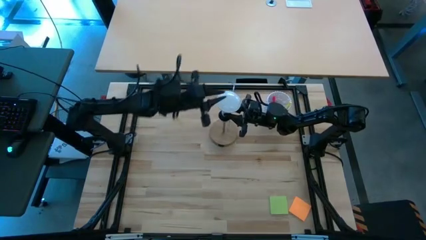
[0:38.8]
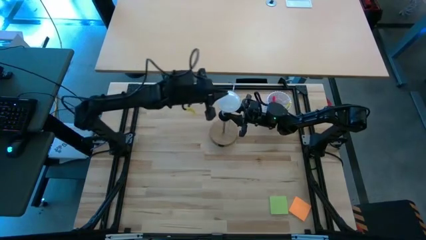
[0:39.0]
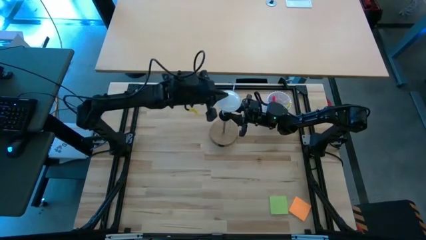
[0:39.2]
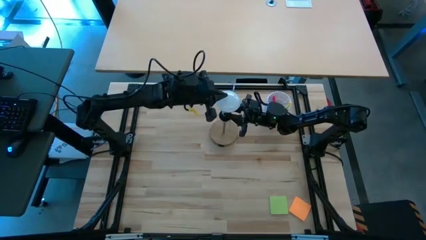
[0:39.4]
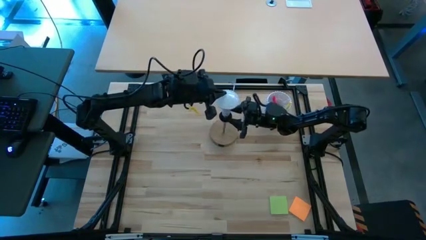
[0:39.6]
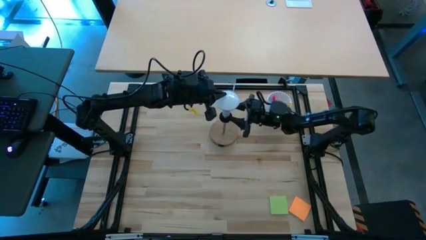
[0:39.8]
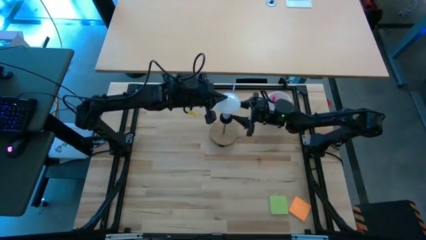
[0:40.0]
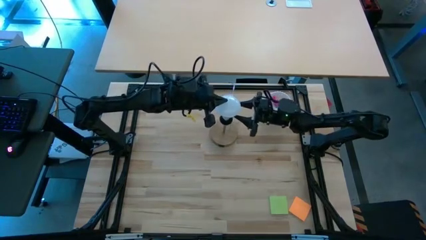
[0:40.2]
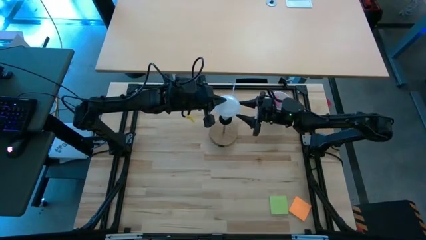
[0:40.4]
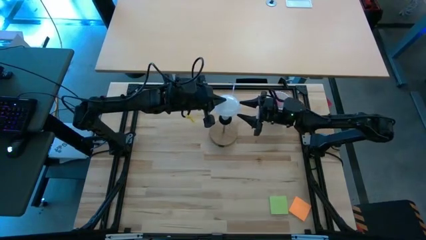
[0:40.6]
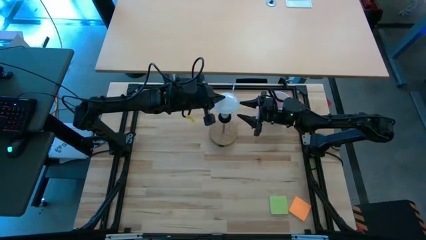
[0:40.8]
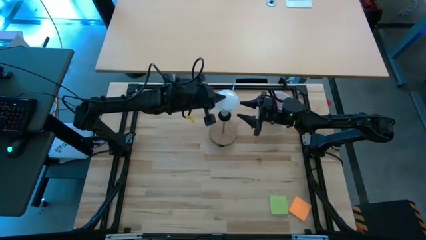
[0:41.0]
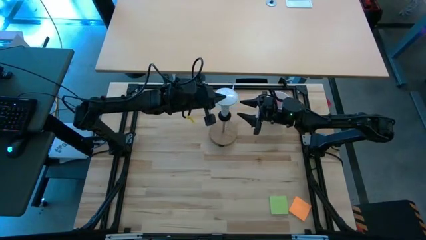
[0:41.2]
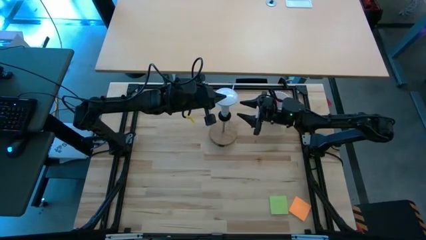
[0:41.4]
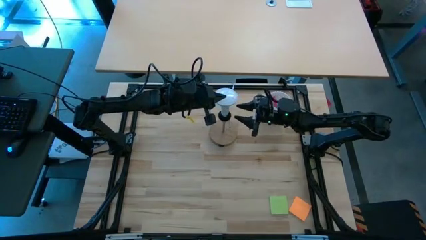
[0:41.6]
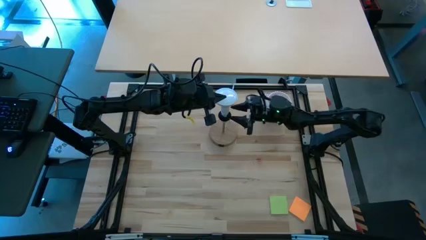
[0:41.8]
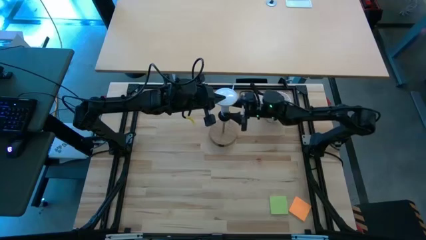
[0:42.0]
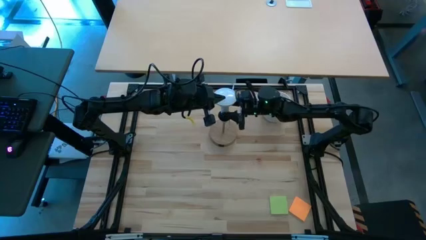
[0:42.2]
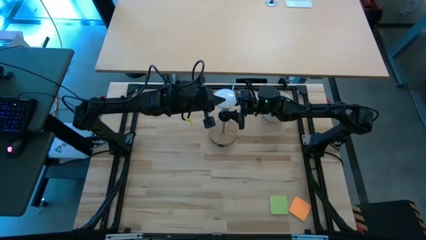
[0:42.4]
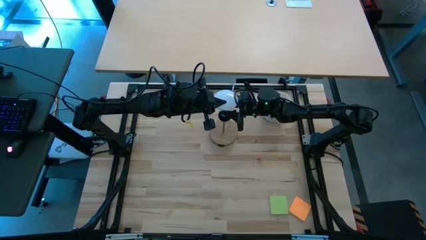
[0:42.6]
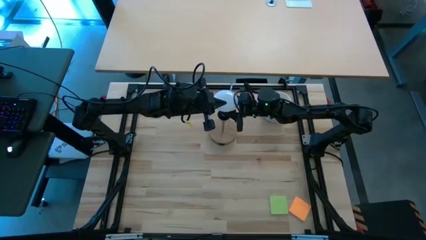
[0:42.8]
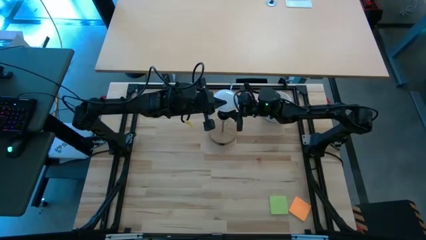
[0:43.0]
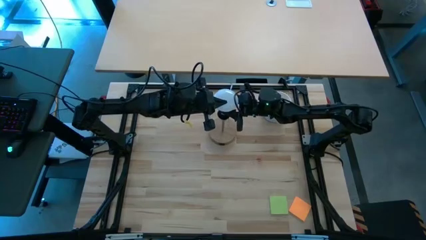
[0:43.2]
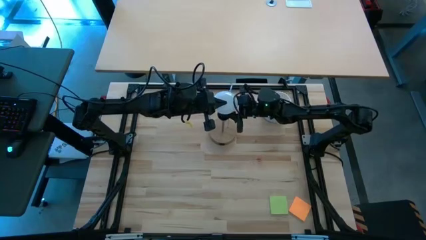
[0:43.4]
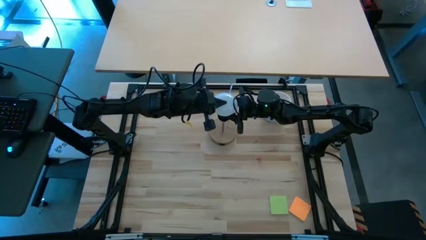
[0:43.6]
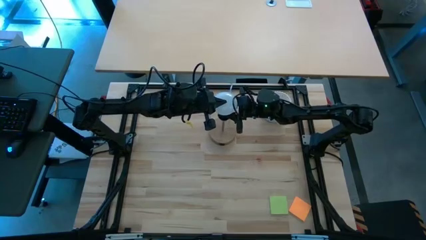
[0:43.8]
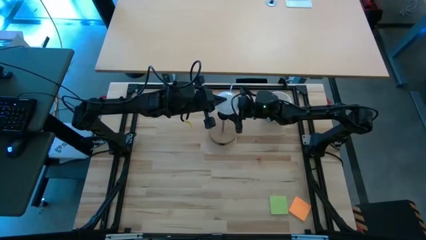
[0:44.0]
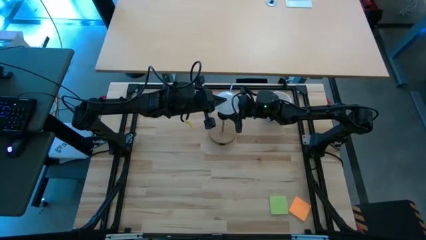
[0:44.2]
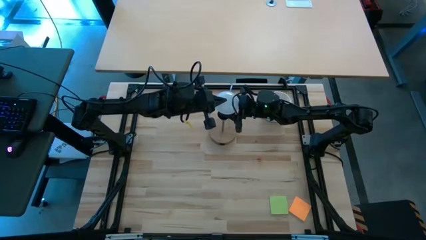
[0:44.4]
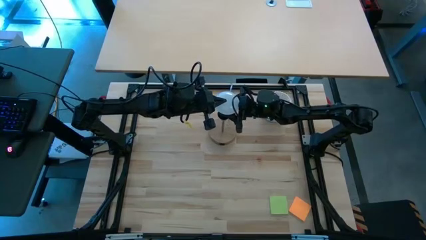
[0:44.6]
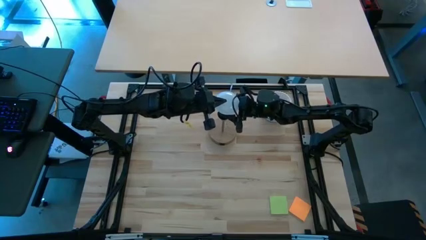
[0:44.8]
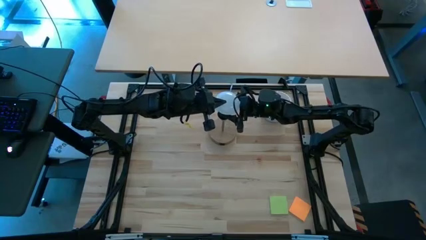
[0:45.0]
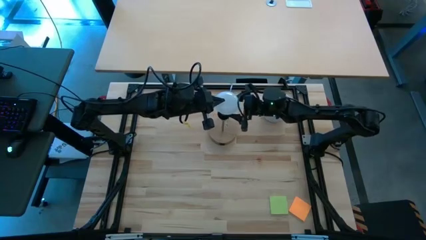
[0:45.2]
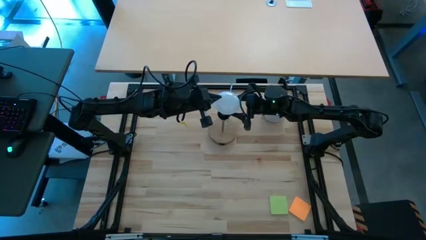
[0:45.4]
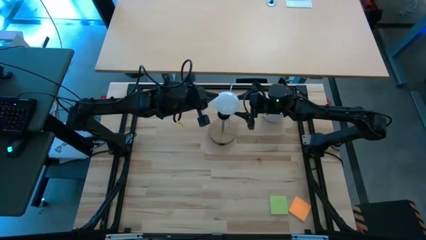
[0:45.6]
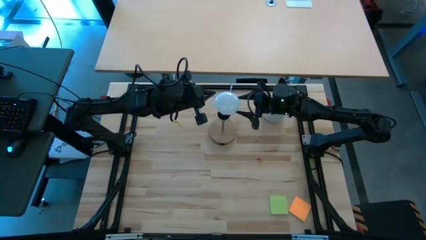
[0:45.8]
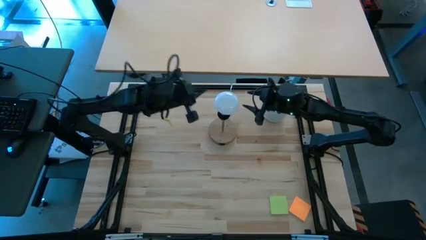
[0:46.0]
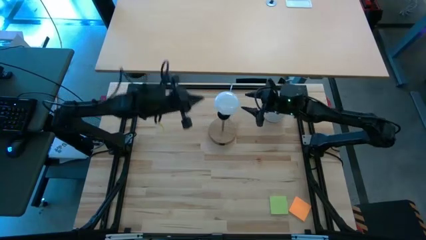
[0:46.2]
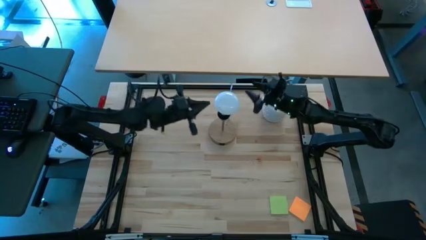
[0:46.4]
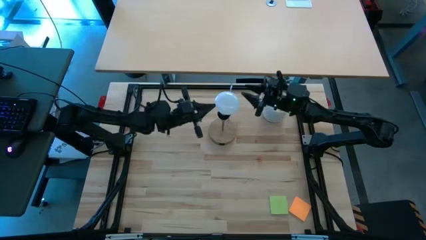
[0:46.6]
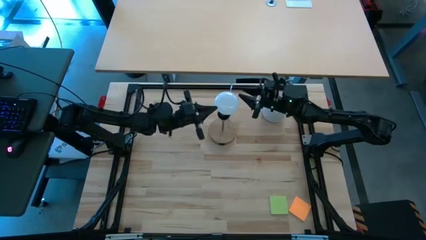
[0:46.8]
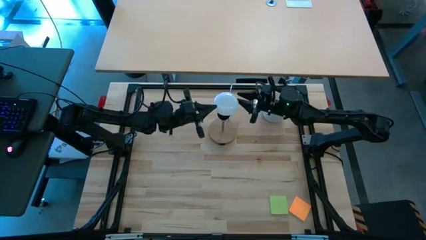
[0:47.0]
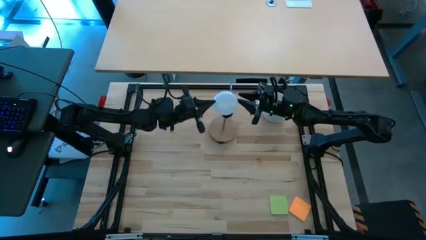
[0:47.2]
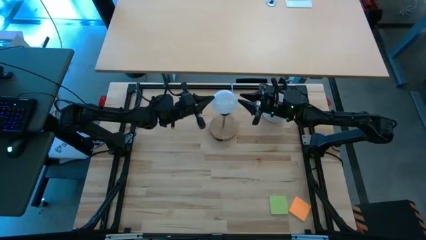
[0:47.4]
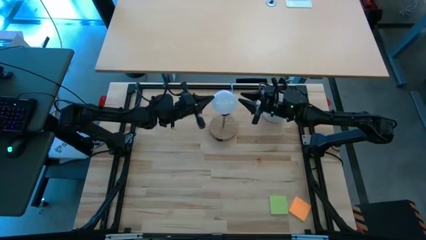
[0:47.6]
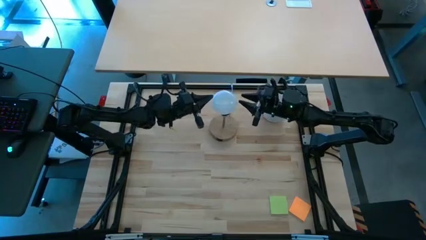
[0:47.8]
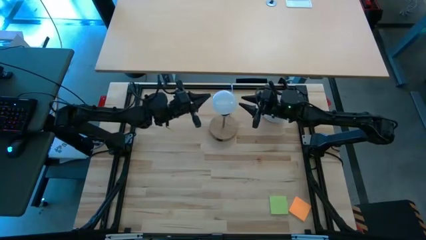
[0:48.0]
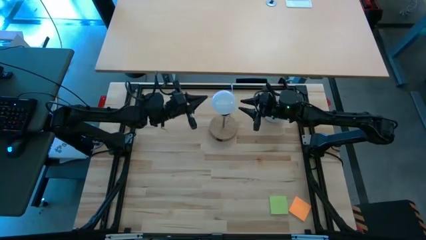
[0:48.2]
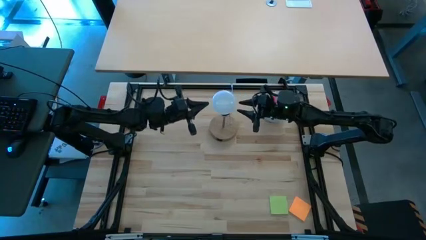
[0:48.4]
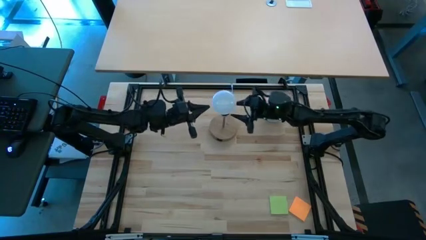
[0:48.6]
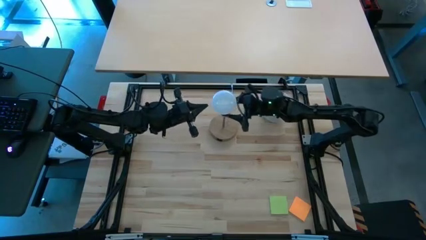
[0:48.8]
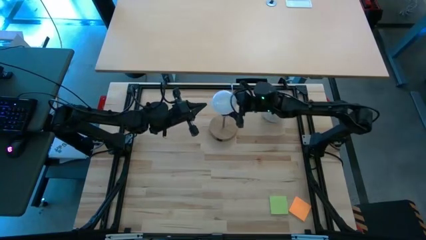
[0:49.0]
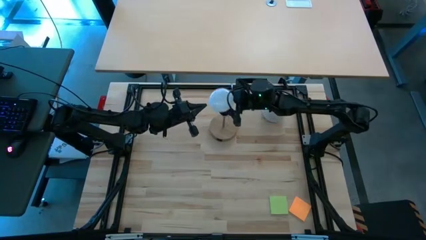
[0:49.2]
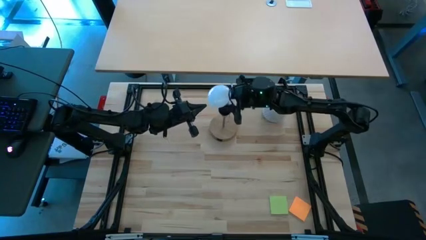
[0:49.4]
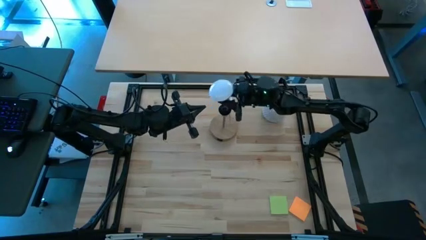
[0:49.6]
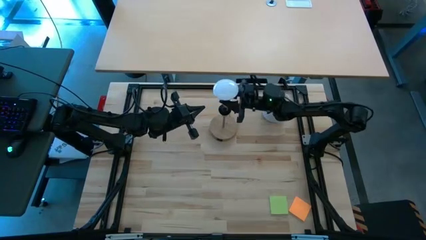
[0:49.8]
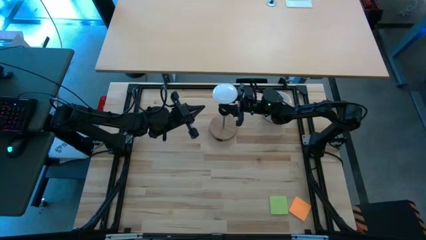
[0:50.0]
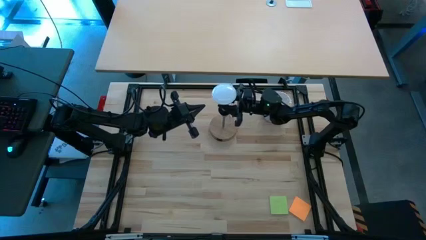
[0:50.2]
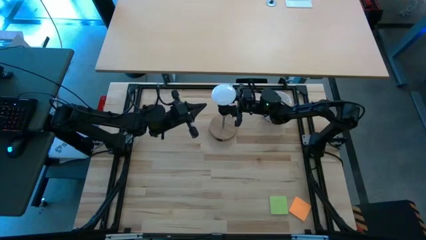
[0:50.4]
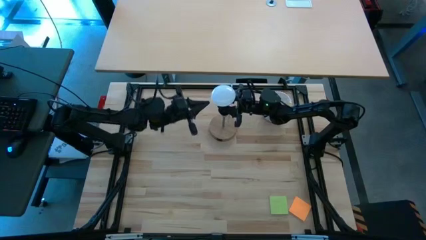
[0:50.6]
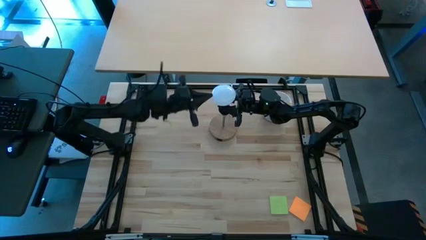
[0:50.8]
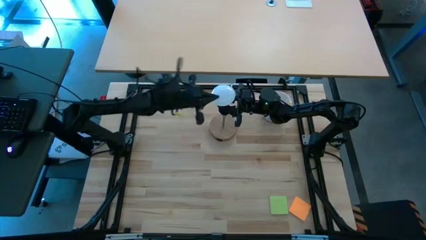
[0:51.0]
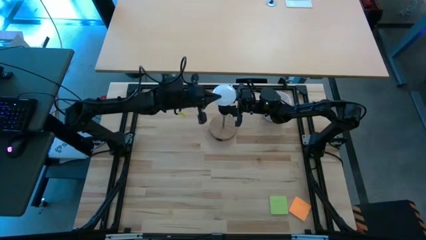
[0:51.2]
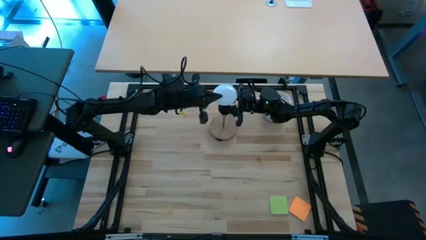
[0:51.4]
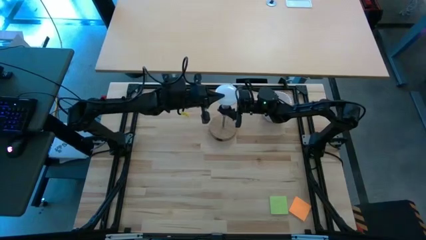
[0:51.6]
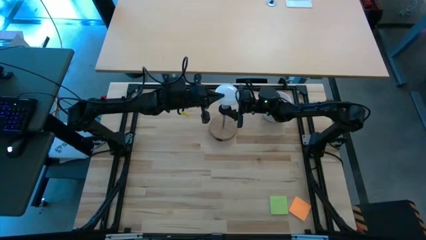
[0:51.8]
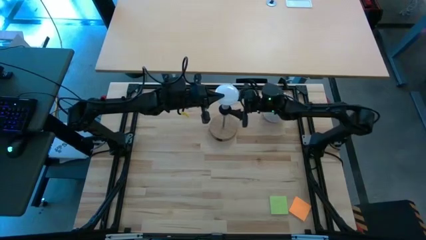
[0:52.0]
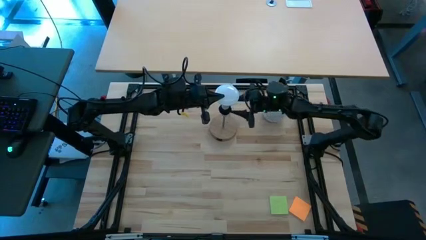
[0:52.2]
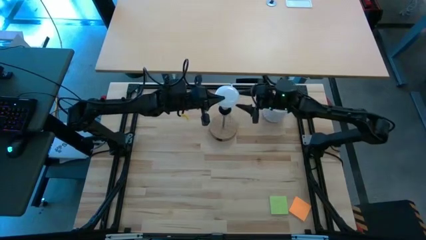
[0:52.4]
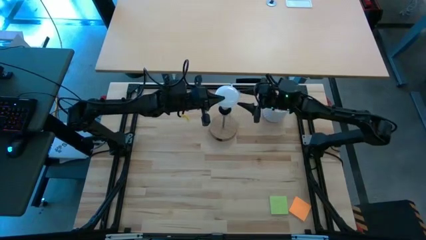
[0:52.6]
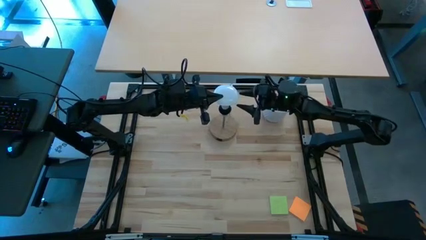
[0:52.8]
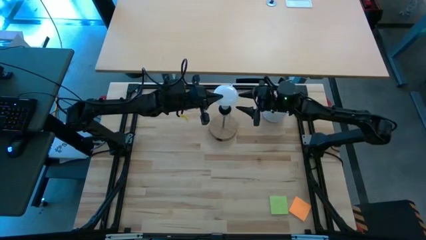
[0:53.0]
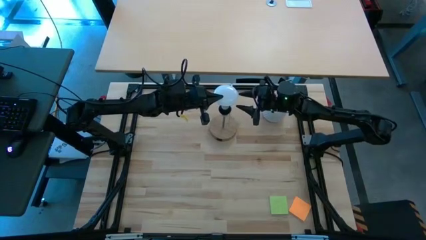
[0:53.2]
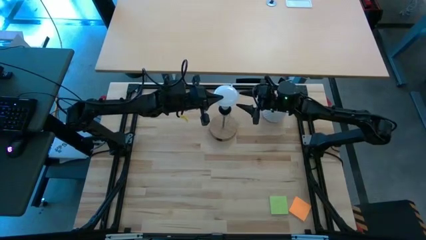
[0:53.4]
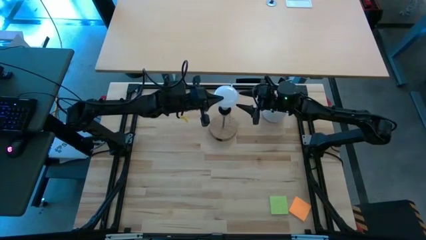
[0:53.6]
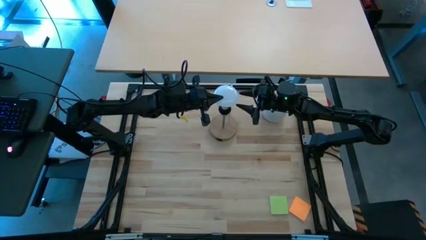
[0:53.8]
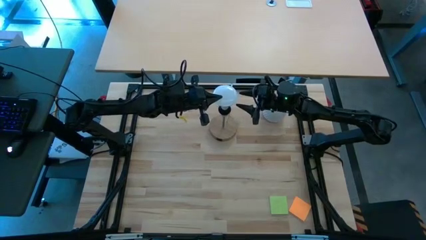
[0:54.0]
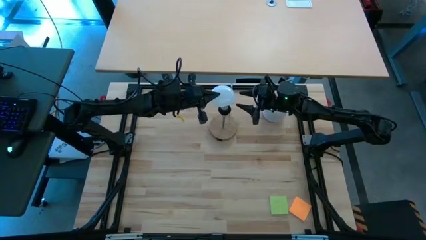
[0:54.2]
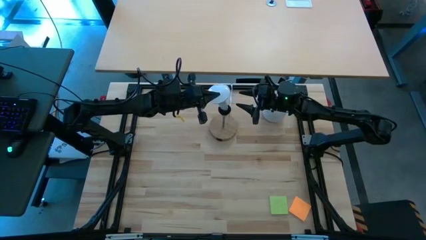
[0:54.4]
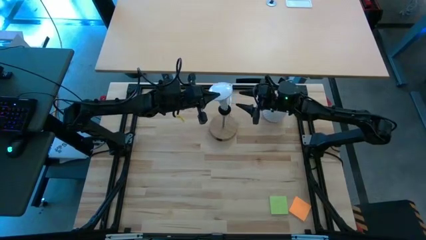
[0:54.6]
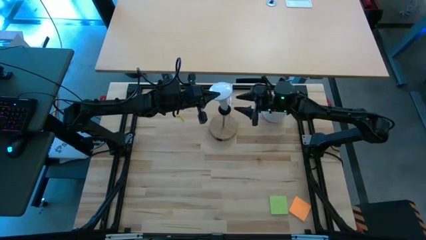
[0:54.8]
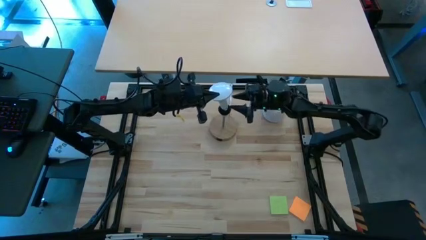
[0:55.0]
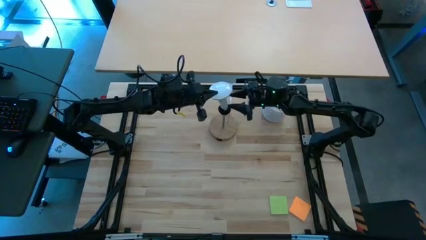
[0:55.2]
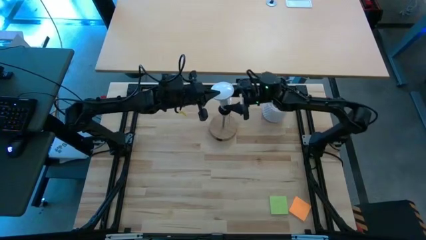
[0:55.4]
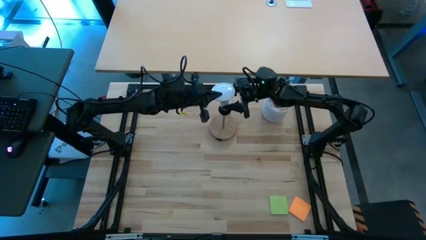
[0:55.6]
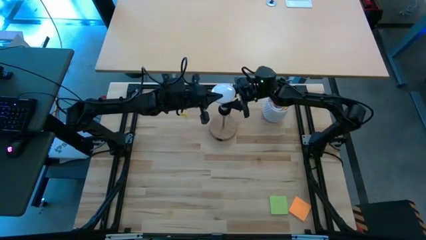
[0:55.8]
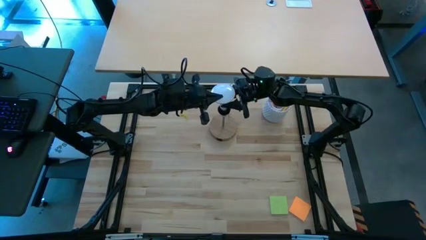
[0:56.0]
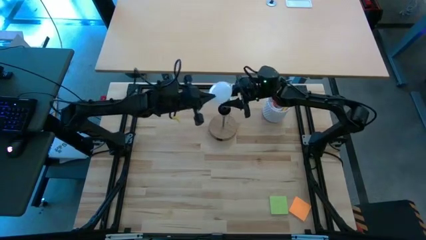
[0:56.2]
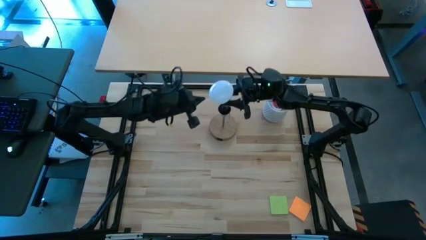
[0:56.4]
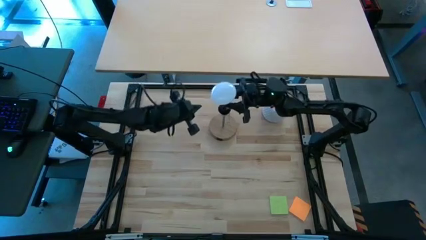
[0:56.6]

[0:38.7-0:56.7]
Task: Screw lightbulb
Insert the white lightbulb into the desk lamp
